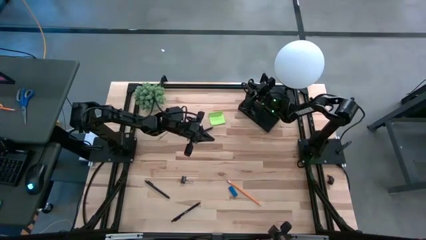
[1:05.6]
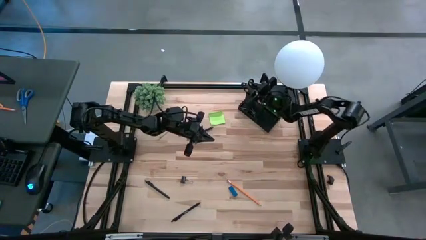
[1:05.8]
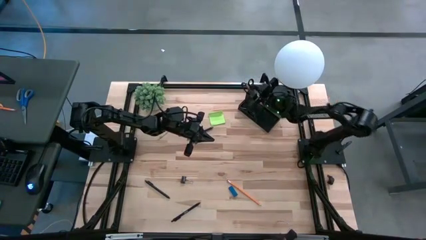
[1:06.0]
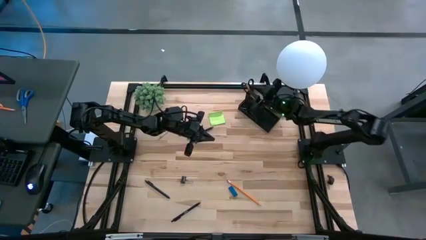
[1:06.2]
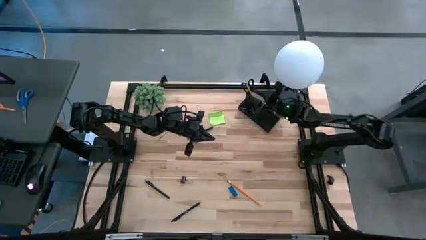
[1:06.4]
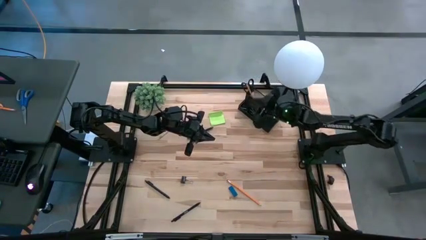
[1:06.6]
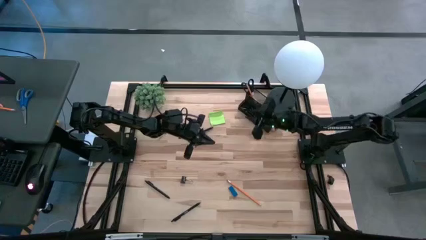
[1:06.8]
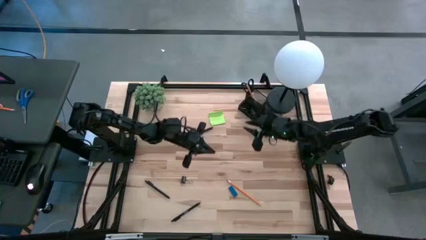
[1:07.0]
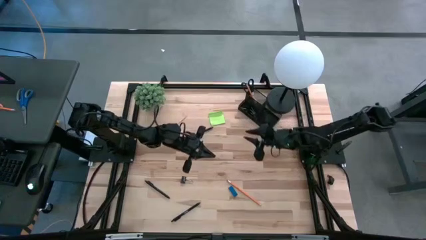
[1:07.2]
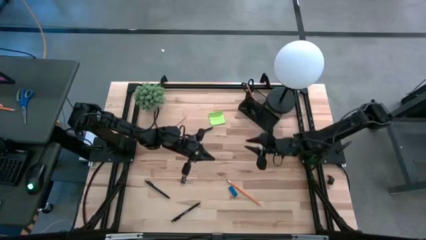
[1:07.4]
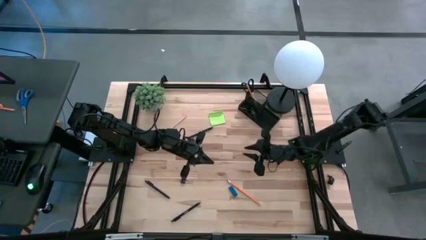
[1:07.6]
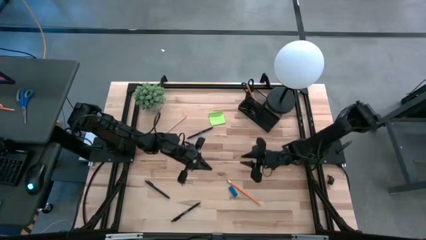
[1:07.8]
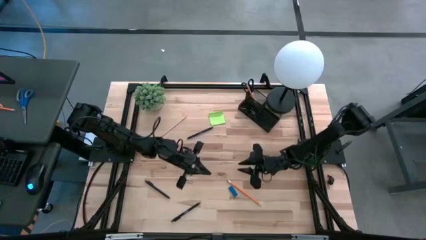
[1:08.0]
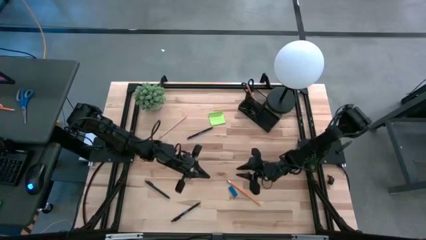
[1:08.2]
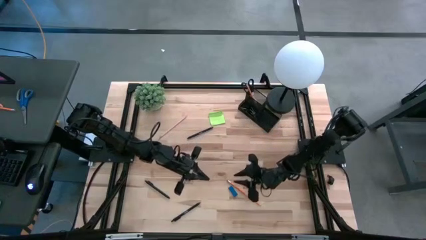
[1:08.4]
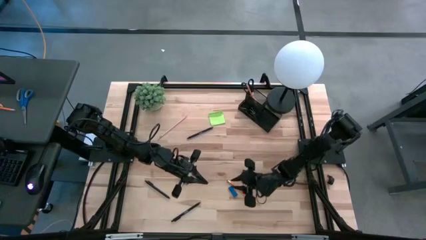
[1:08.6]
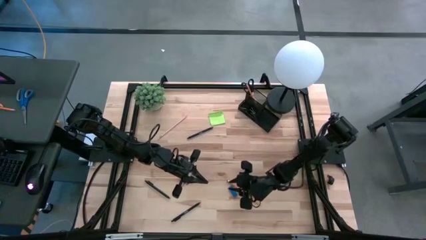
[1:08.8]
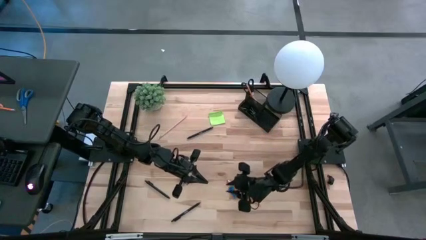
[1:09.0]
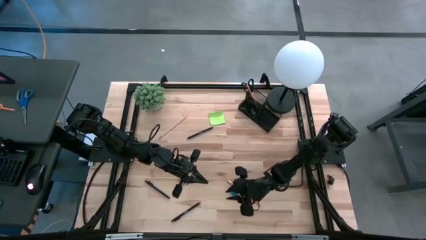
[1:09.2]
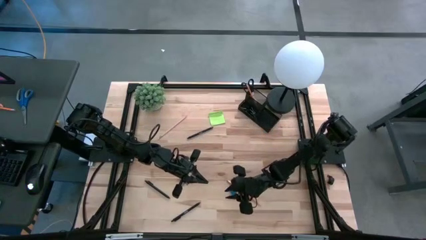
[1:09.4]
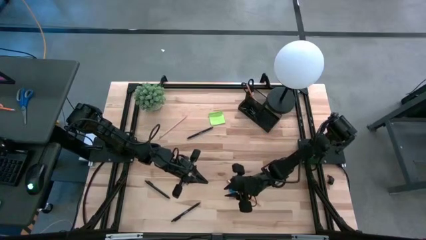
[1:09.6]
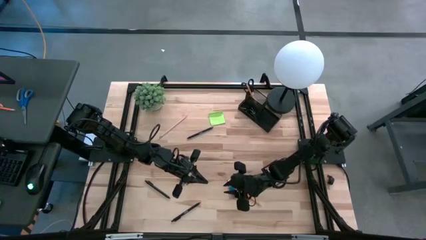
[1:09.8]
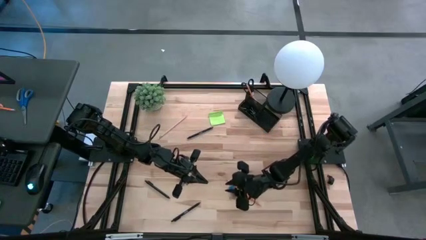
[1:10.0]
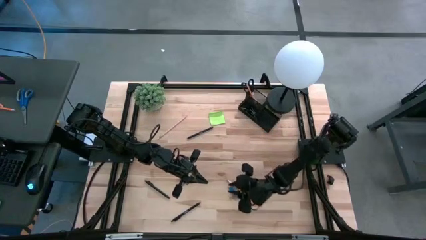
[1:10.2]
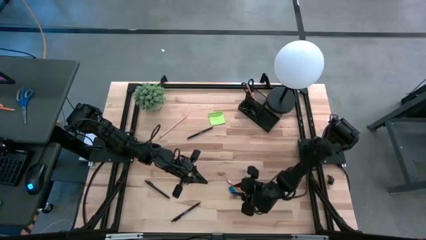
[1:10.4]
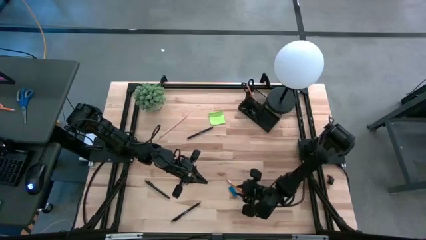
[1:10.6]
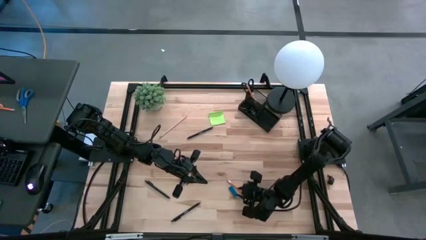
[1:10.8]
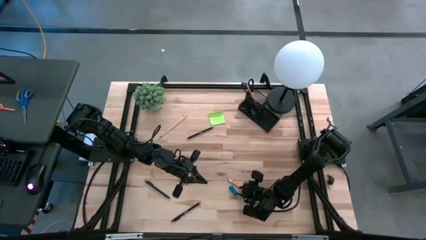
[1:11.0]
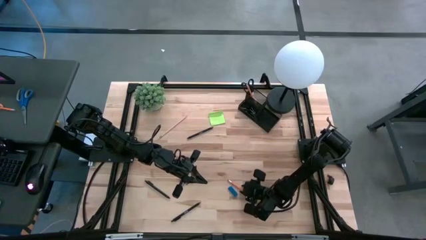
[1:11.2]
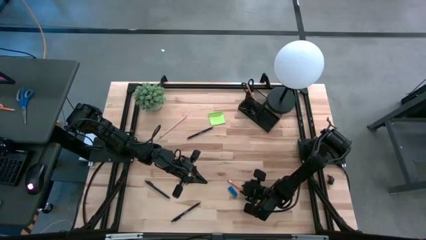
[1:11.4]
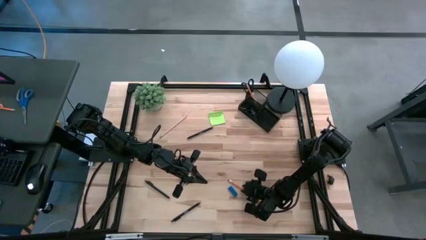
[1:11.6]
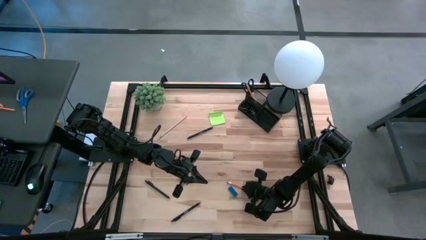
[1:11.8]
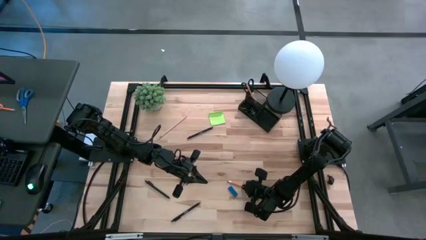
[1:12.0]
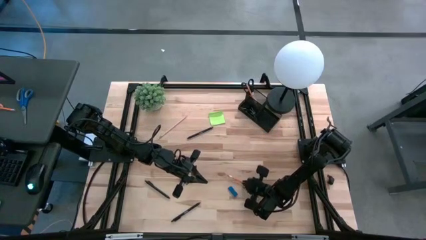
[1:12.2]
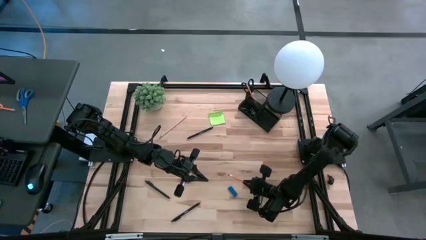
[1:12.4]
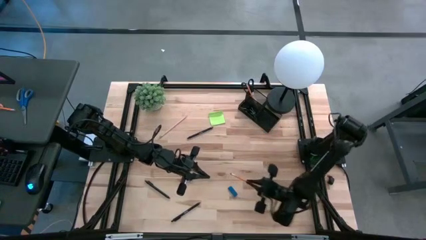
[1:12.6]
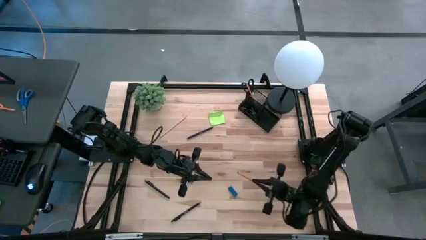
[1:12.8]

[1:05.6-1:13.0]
Task: Pick and place office supplies into organizer
Put the yellow pencil into the black desk organizer

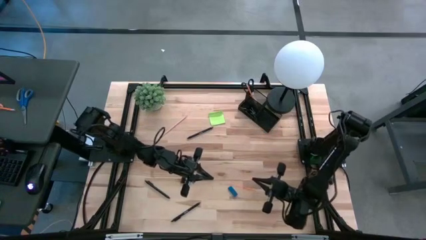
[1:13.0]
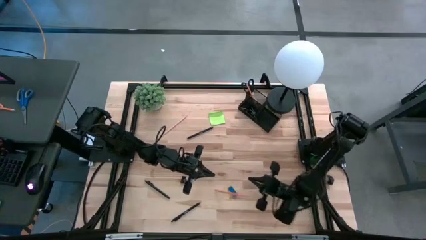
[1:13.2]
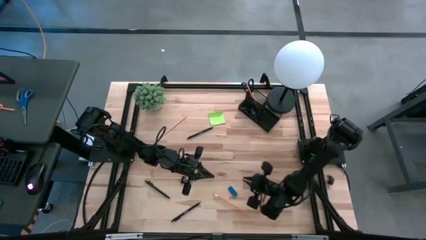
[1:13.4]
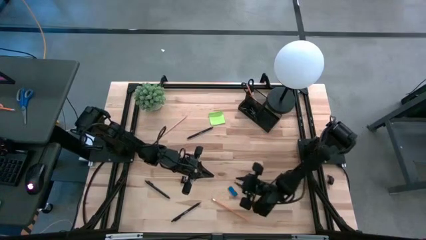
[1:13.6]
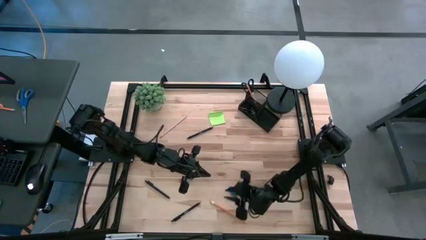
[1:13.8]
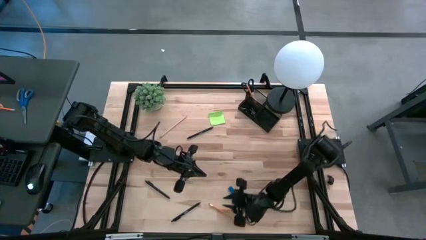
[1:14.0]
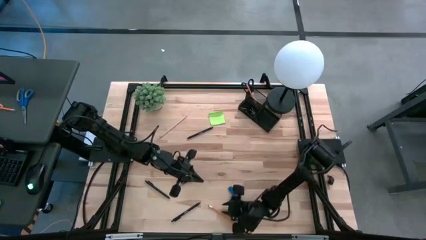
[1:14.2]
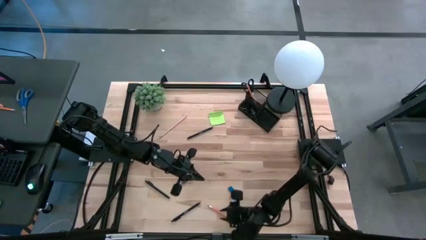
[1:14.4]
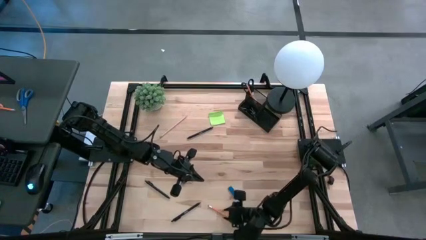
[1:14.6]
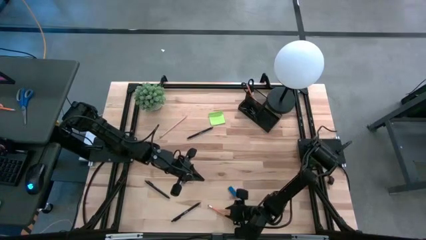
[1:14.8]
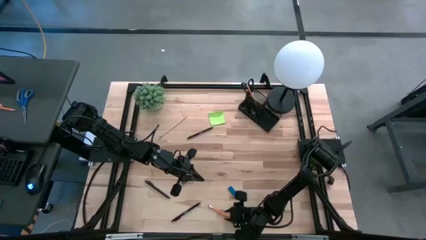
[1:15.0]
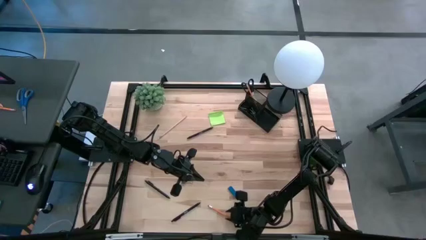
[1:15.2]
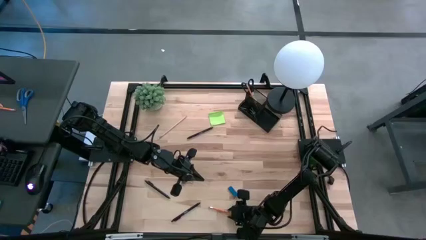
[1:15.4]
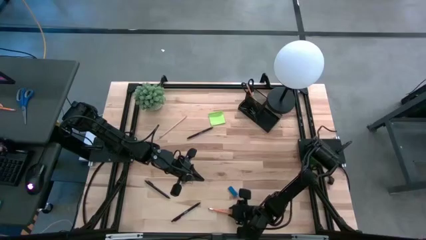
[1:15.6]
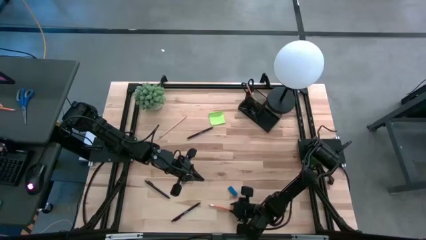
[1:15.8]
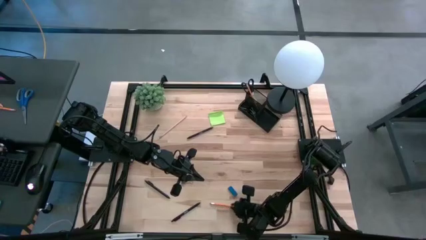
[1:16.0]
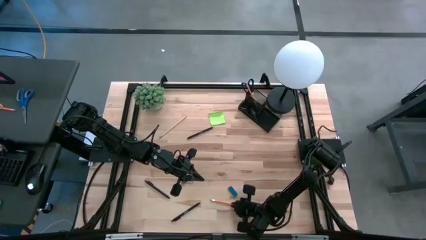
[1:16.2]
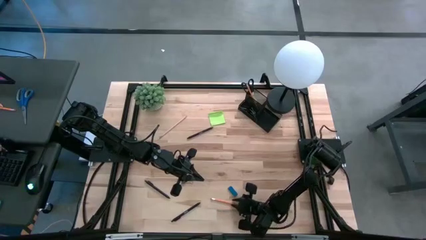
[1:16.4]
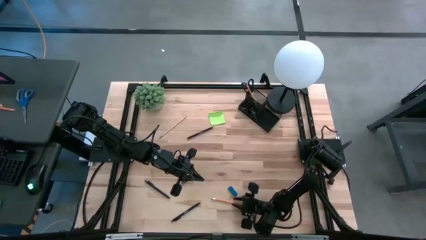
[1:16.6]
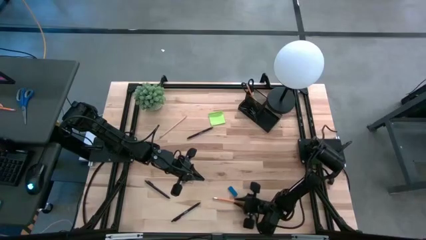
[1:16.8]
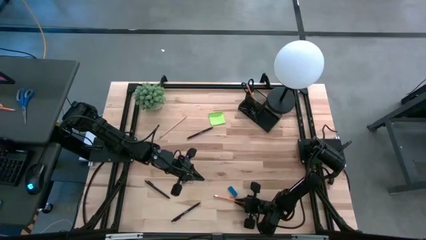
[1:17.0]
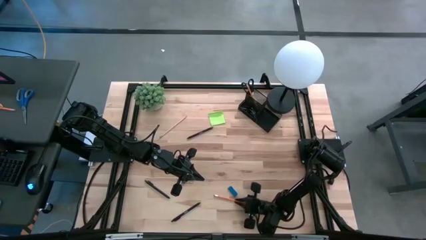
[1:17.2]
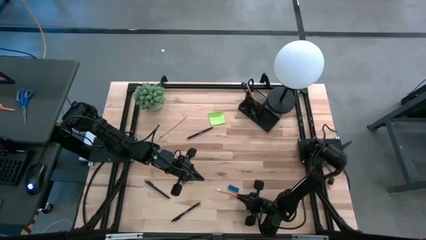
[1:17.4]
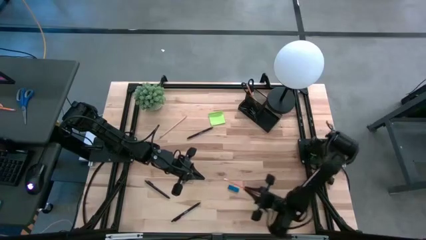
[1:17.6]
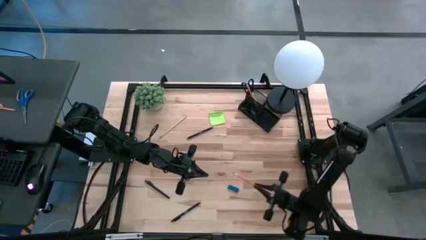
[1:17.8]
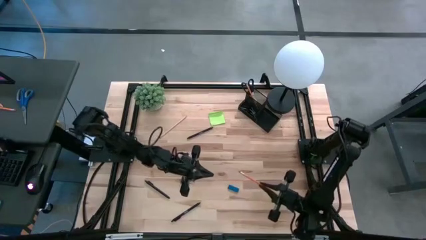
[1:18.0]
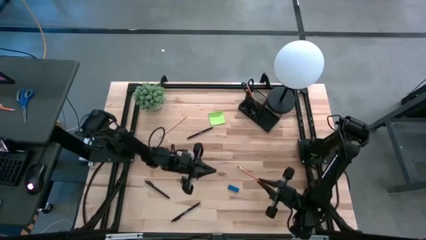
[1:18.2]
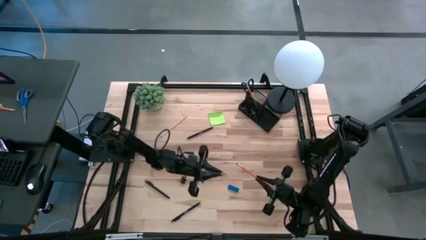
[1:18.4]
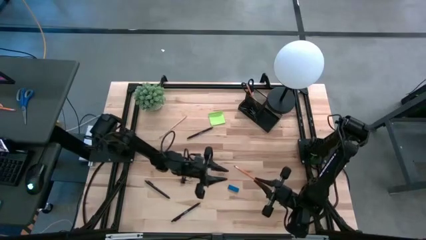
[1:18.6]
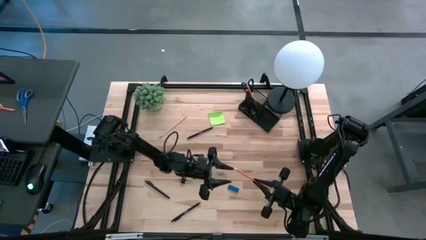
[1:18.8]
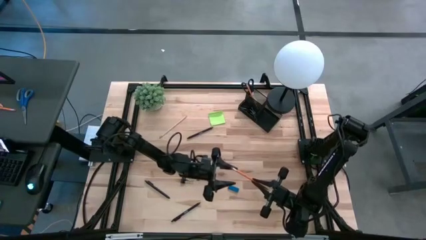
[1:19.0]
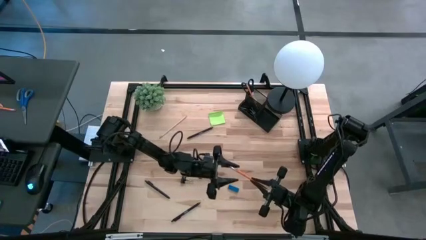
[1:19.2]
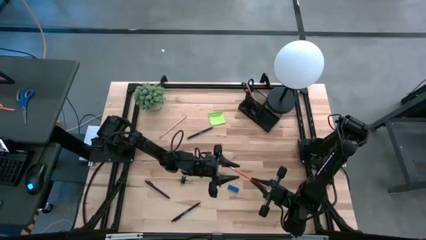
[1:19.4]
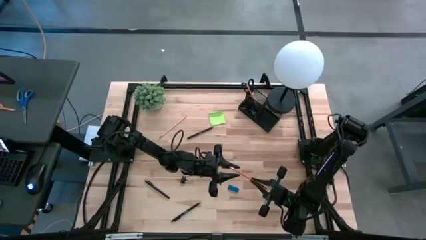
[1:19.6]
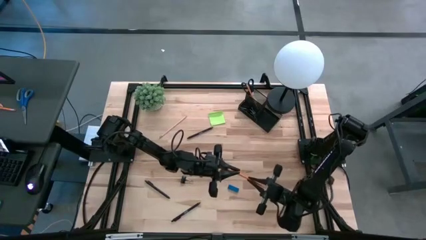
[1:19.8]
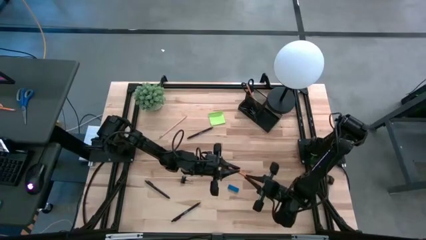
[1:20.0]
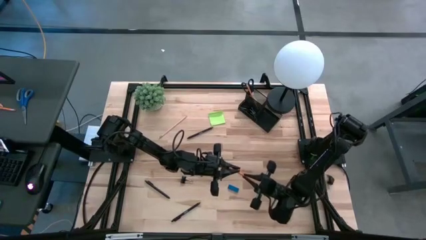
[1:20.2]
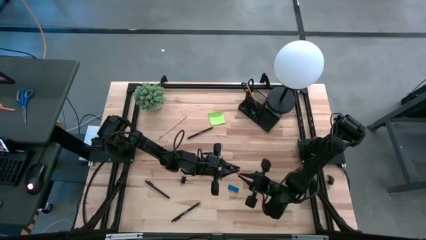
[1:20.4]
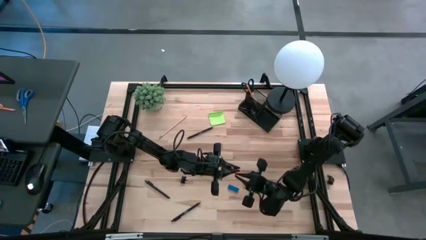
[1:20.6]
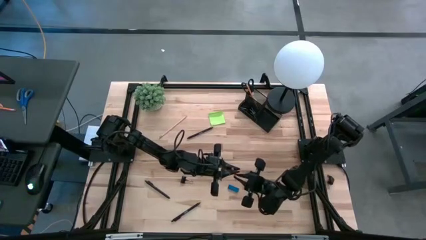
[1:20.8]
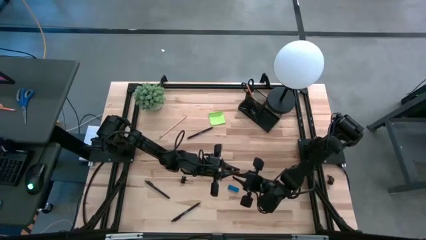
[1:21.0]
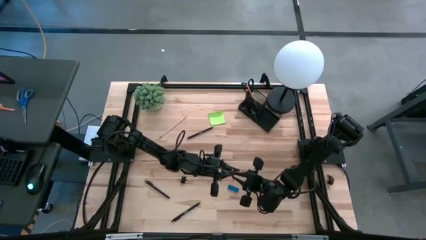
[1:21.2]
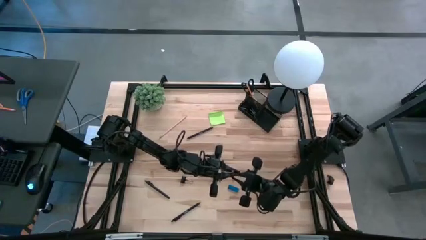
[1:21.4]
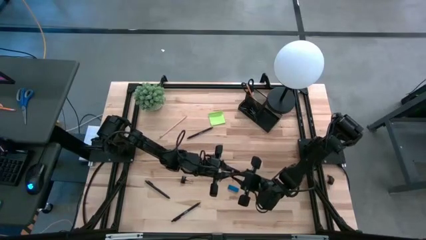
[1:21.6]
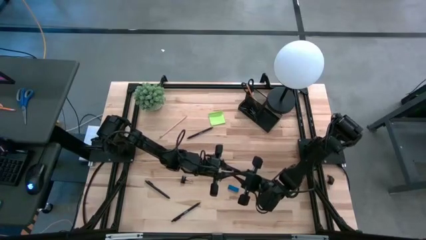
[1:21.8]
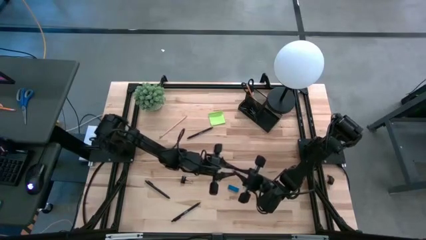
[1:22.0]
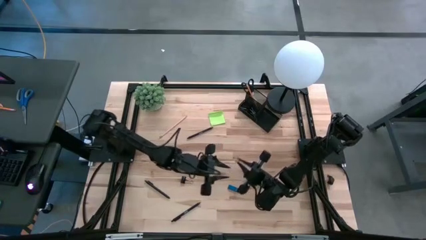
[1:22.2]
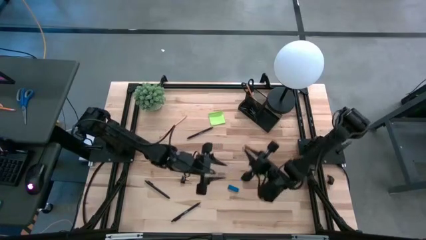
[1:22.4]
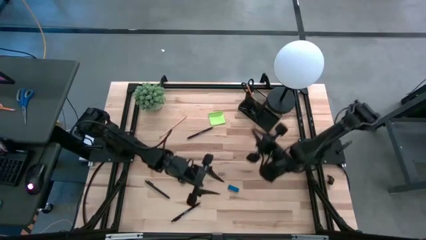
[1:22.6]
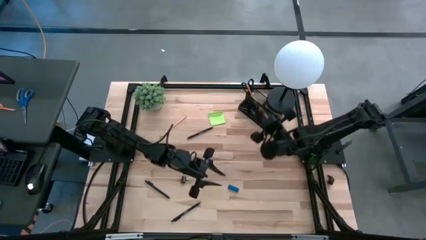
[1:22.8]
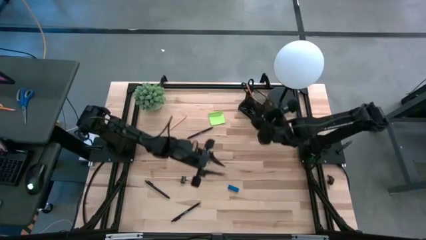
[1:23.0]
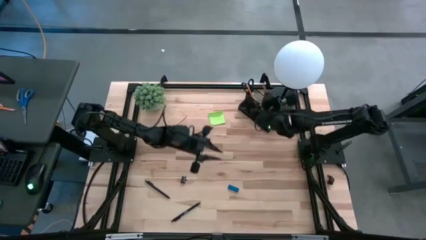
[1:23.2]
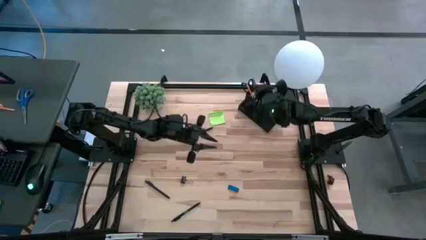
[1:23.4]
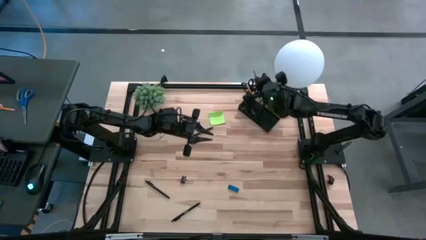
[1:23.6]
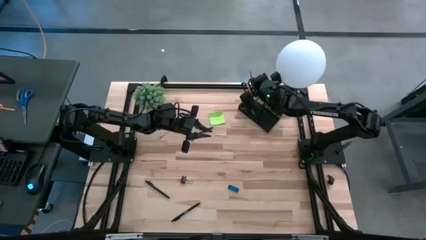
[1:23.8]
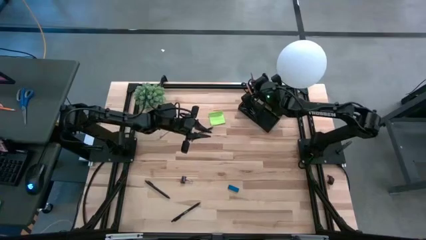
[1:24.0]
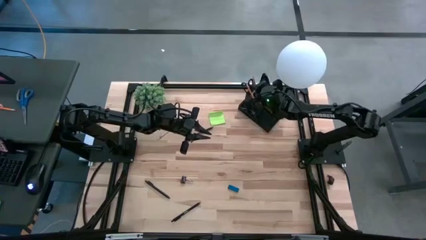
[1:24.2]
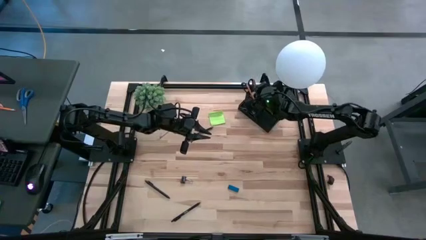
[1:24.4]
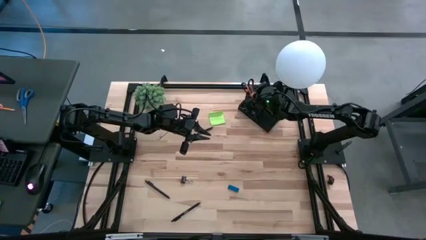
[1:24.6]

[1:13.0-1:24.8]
Put the yellow pencil into the black desk organizer
